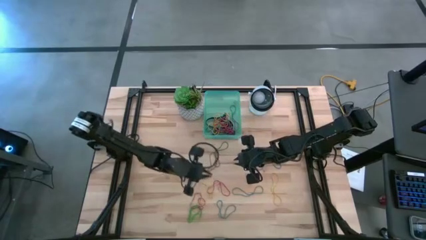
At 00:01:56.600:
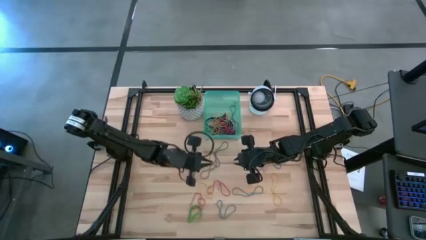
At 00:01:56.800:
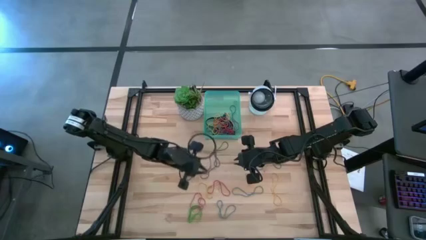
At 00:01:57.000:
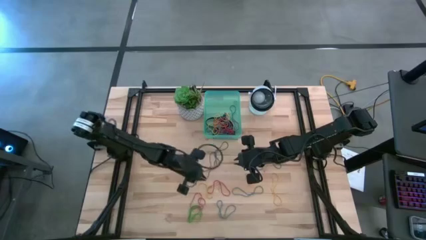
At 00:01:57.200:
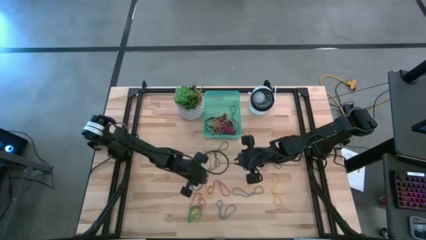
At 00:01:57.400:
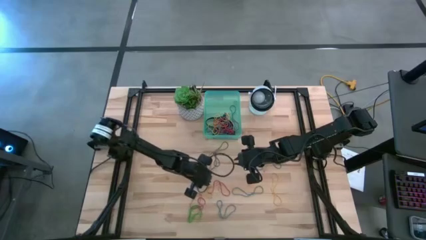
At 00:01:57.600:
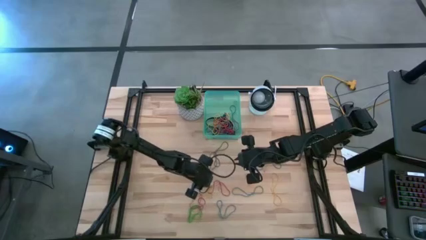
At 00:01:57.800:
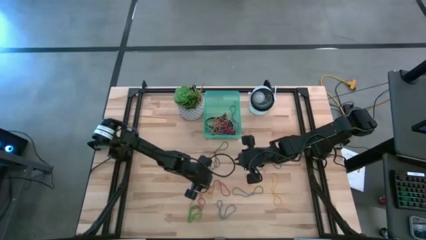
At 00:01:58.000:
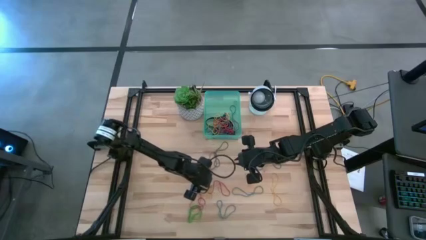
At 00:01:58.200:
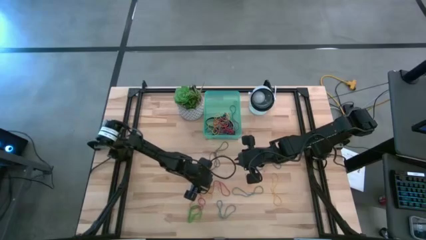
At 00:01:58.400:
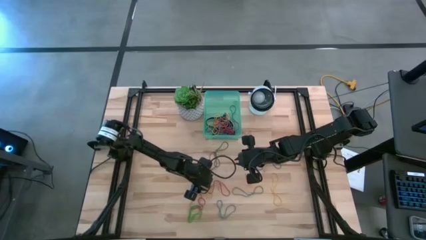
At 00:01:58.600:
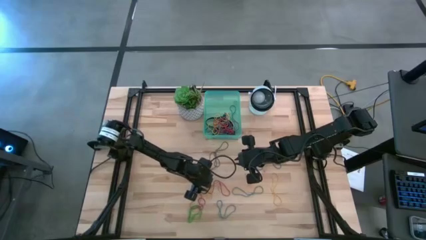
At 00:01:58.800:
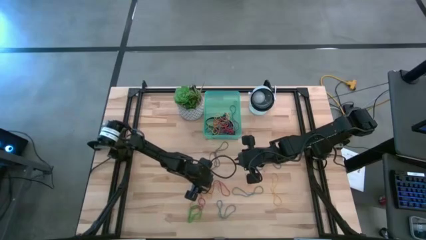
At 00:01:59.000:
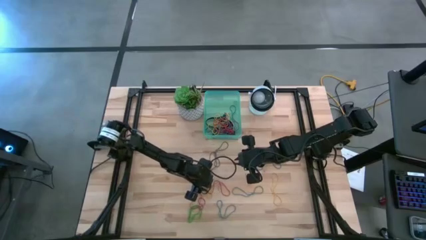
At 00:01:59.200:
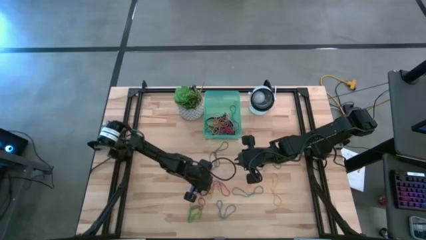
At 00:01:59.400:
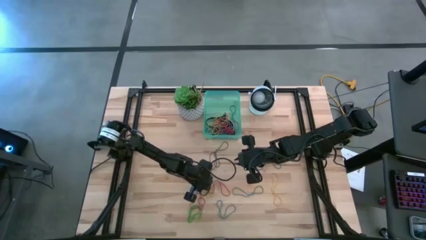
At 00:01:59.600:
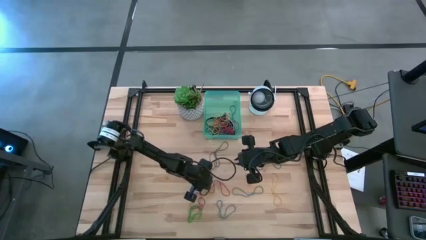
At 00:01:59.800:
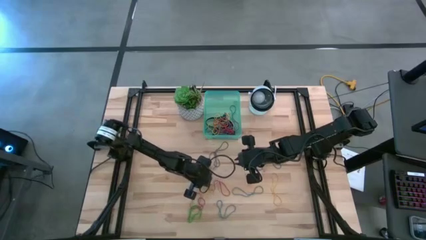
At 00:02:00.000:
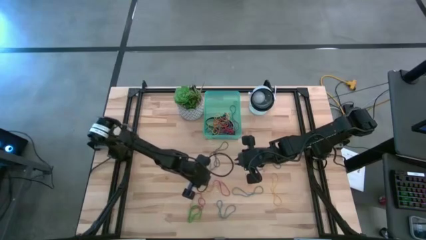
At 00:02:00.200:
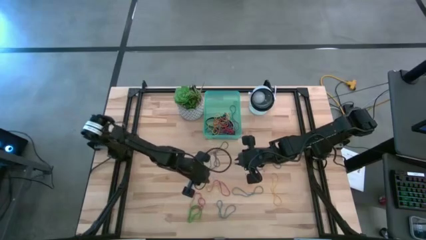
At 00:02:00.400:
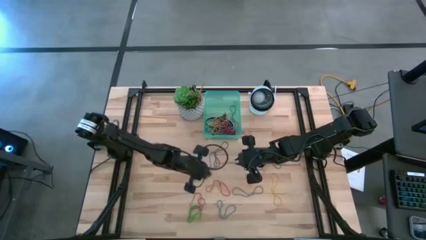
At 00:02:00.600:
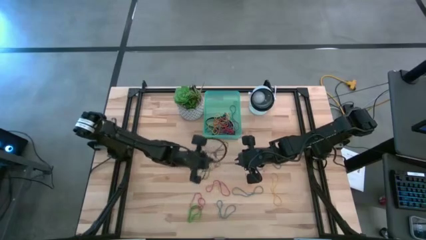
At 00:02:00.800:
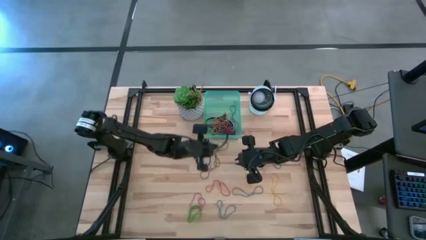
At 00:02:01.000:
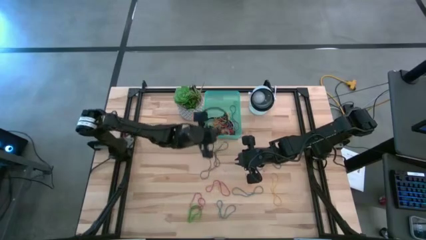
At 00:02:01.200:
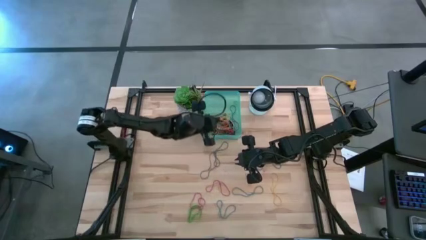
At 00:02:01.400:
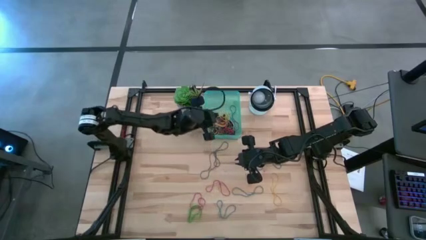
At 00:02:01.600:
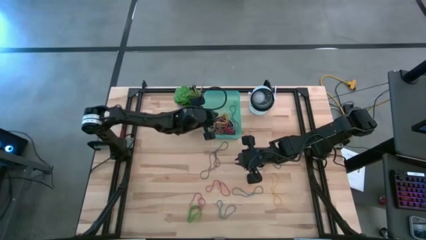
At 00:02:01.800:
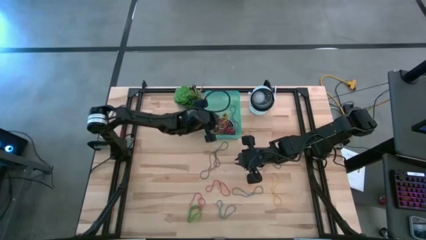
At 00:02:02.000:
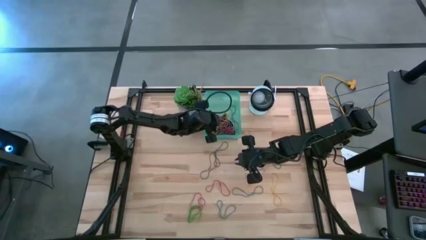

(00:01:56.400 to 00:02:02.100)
Task: Pick and place rubber bands into bin
Put the yellow rubber band into the green bin

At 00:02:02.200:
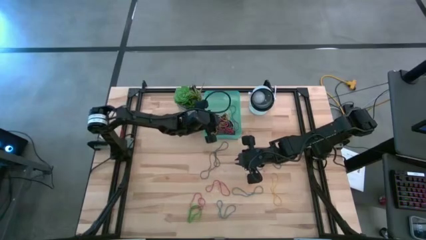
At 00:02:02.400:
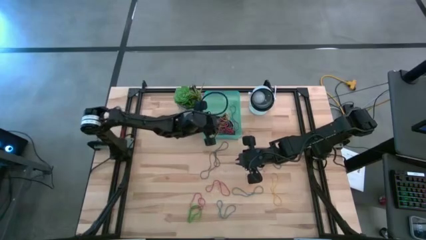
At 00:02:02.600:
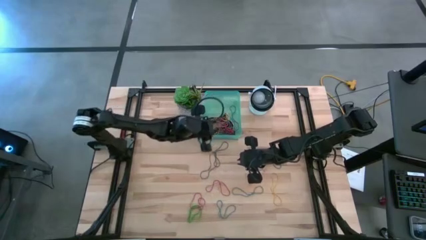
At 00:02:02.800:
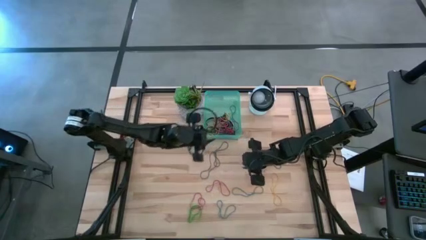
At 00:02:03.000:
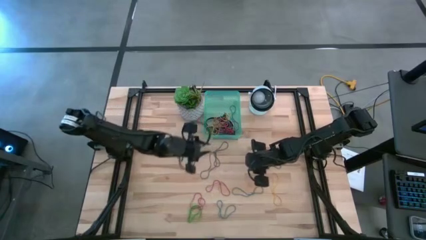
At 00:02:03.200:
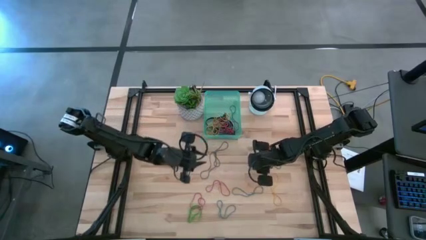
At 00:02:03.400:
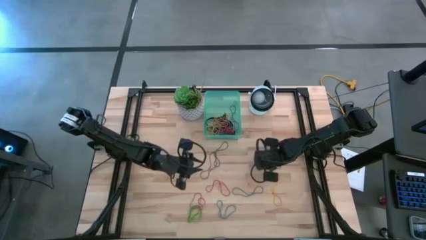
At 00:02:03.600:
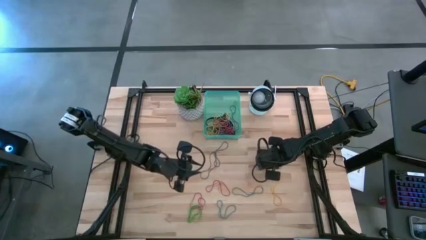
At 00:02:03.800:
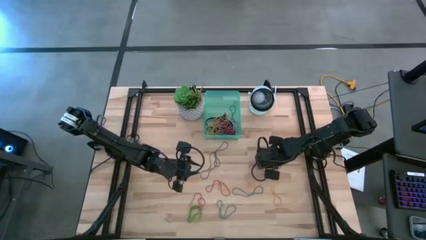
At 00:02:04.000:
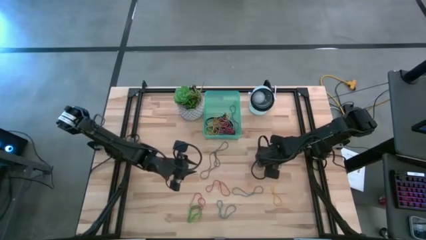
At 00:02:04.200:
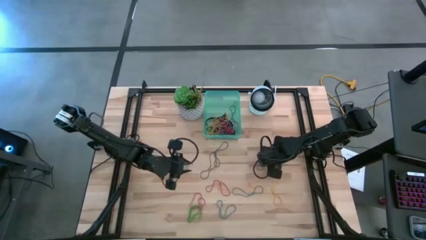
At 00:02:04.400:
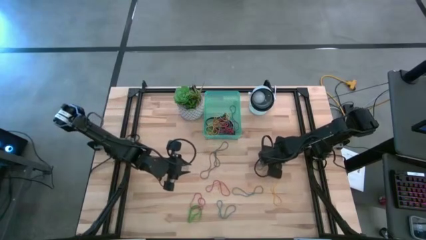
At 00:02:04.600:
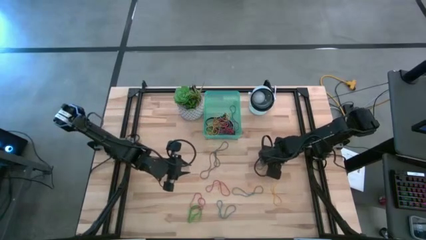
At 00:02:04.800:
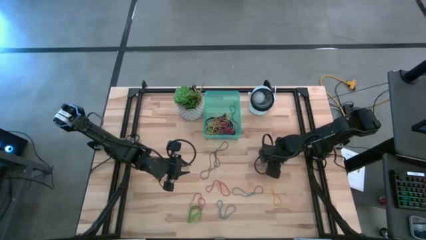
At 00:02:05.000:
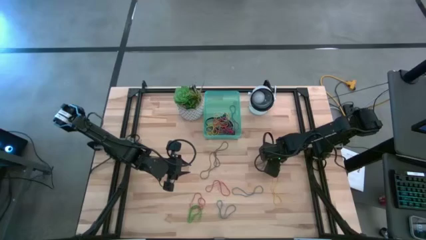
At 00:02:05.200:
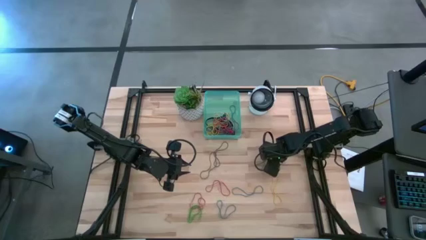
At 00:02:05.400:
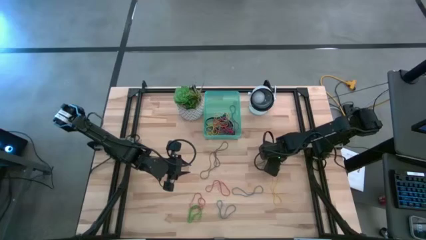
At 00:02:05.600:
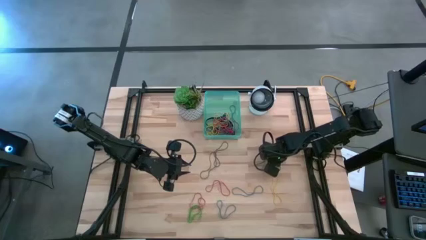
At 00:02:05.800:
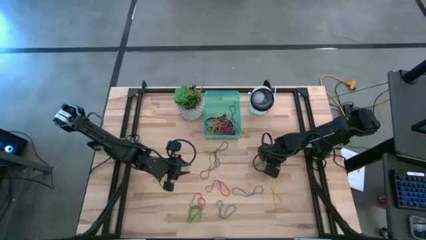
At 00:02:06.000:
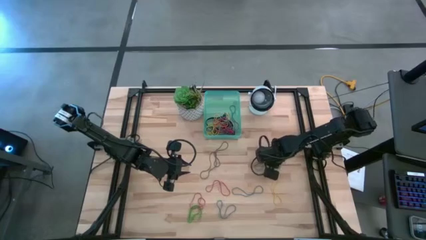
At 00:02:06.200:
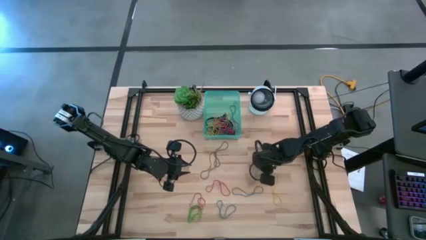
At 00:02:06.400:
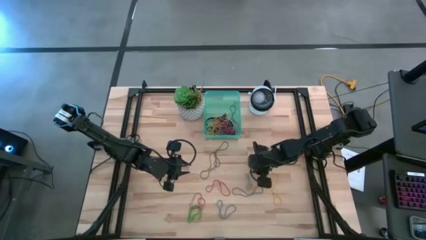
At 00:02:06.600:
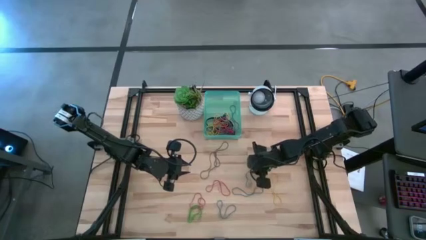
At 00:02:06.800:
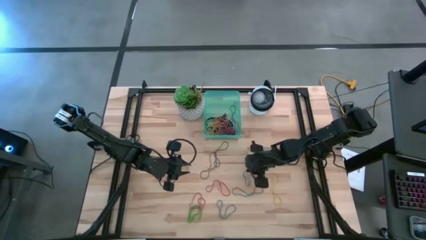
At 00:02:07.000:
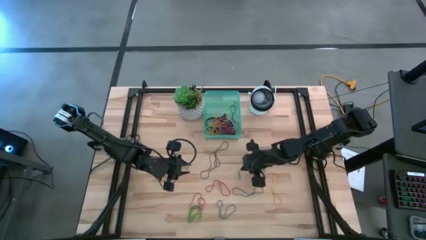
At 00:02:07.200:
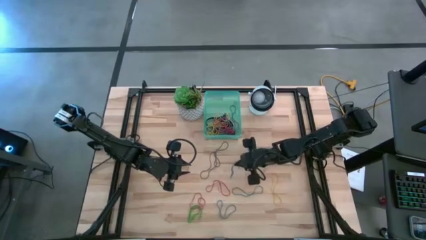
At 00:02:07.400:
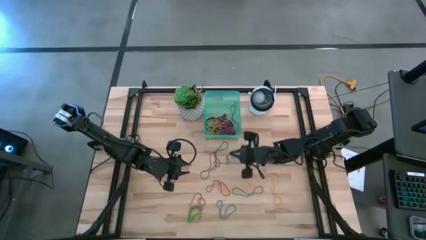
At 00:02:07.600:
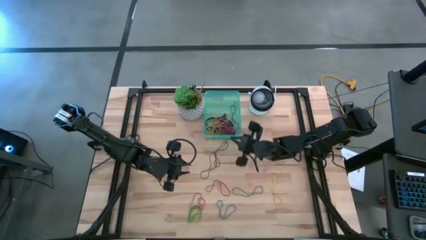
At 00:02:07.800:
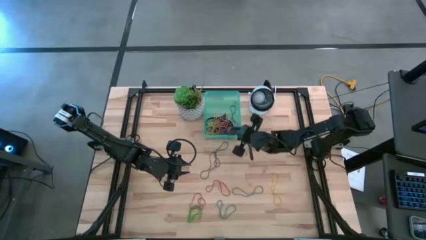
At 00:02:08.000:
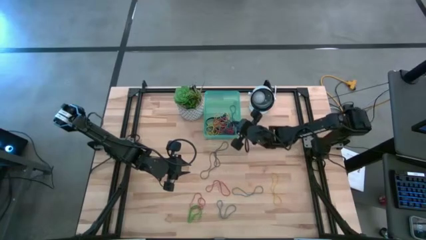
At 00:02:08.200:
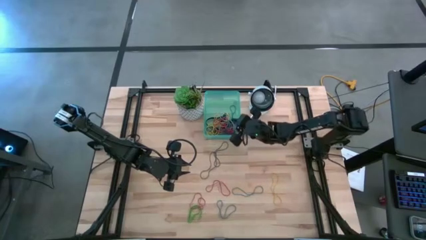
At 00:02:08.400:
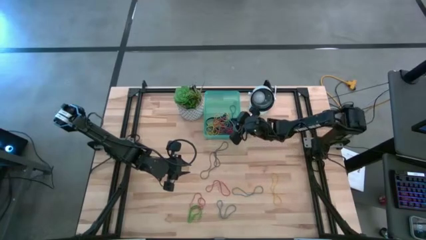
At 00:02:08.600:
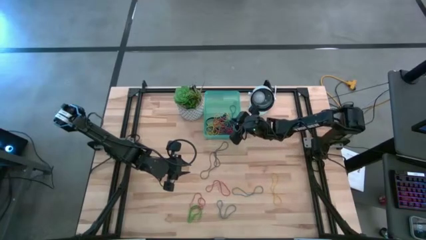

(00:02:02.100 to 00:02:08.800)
Put the blue rubber band into the green bin

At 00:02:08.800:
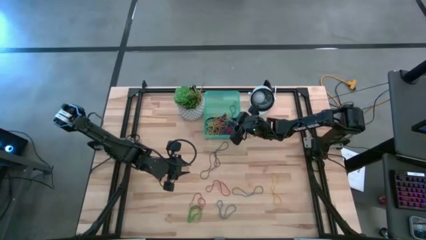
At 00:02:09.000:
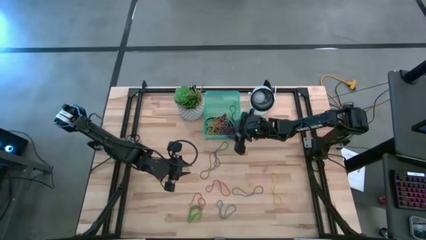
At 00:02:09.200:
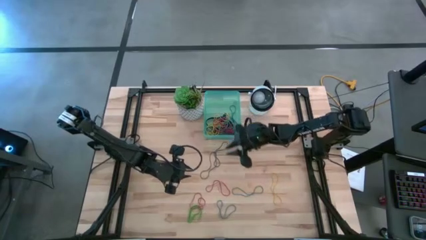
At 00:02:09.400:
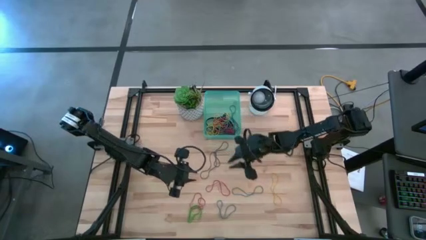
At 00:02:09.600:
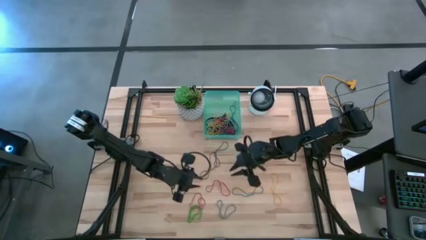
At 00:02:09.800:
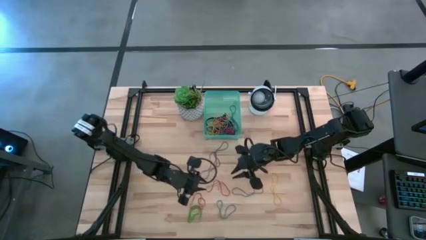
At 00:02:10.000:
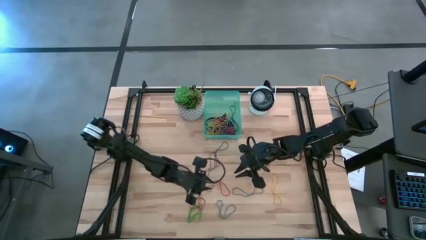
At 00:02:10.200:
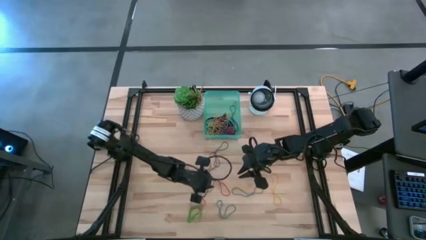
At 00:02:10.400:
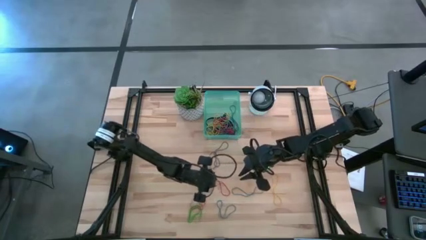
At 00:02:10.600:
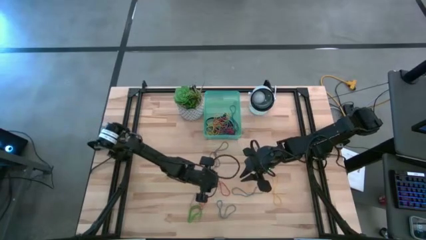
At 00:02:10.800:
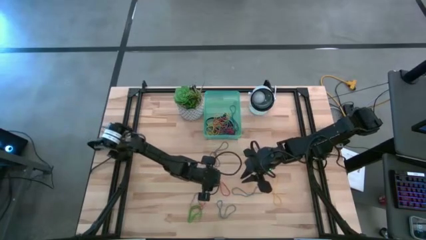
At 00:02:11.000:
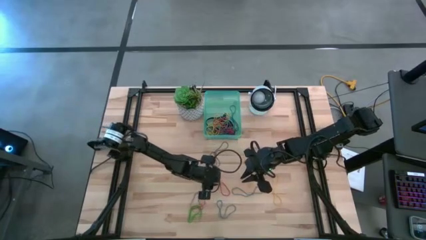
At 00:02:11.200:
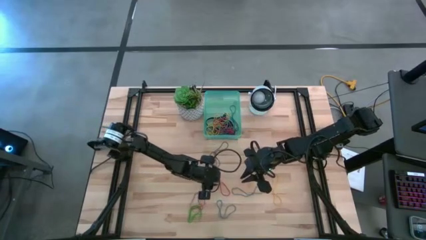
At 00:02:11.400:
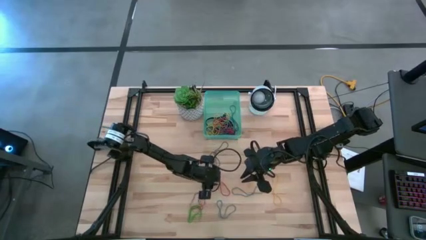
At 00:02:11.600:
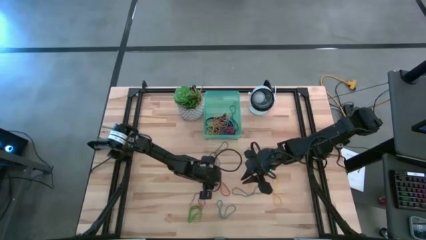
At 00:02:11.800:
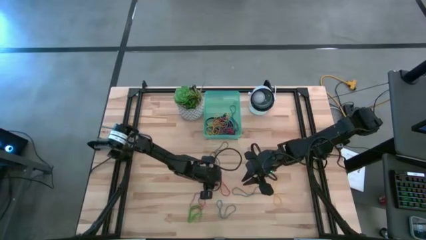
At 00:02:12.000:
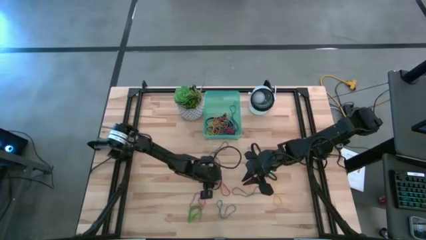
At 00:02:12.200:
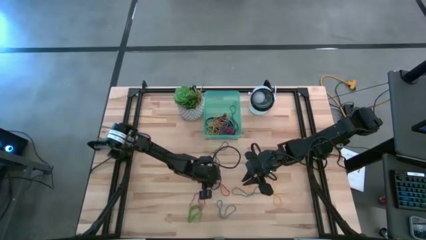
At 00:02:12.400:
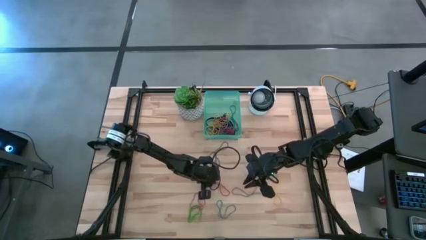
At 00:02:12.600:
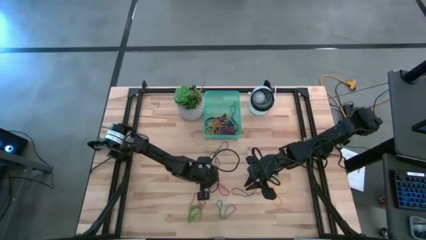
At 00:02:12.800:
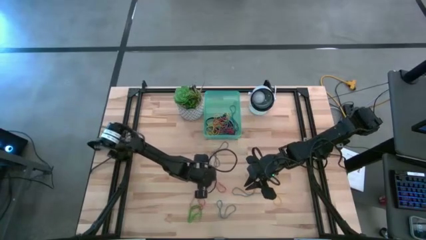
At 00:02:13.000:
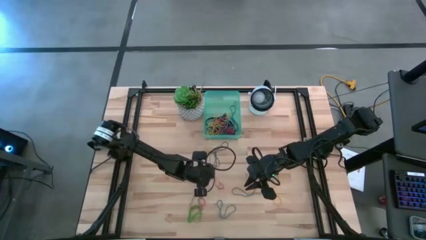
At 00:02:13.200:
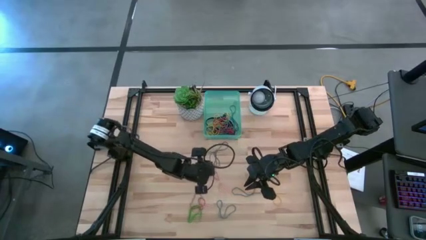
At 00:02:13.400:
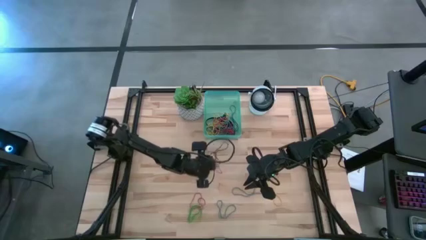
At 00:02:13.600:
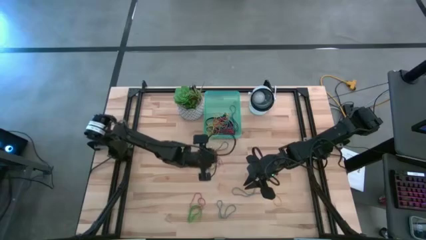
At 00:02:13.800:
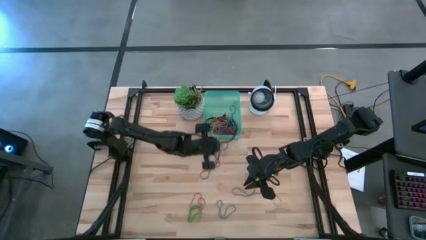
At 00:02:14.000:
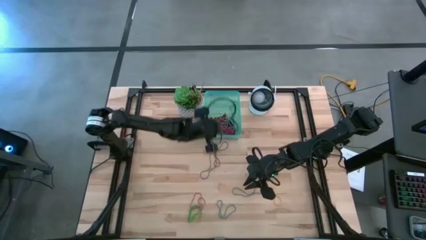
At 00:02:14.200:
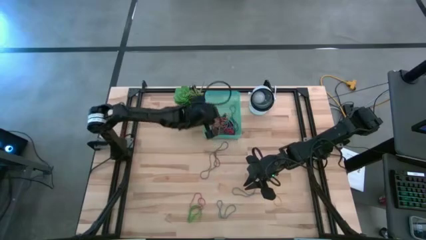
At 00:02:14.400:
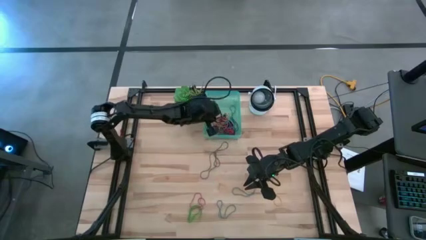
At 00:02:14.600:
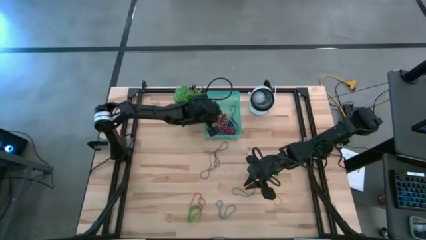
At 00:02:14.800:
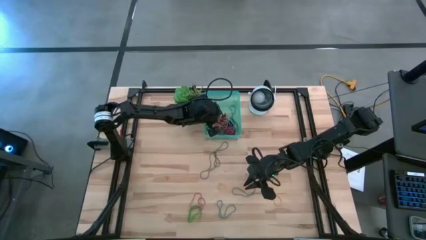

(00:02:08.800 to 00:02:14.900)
Put the red rubber band into the green bin
